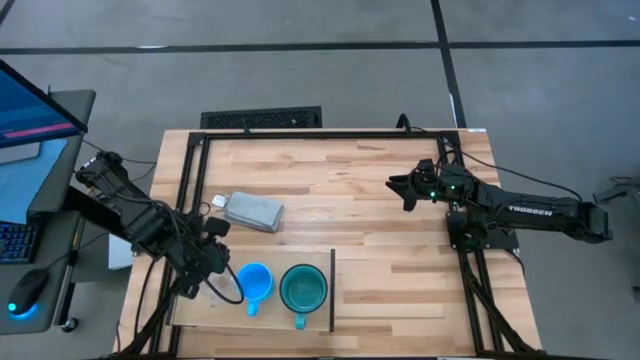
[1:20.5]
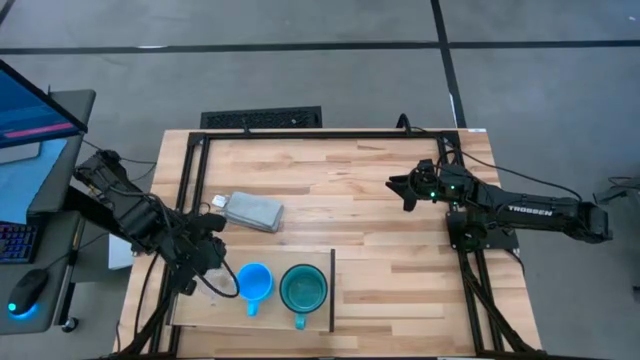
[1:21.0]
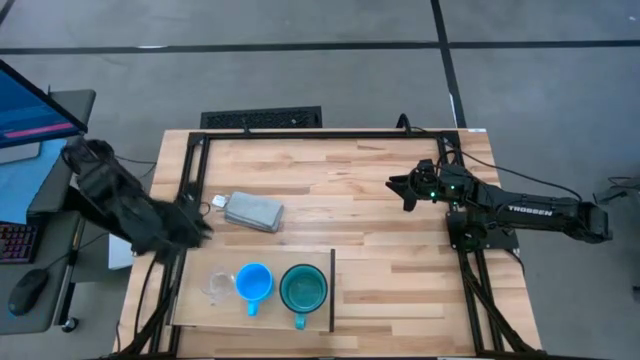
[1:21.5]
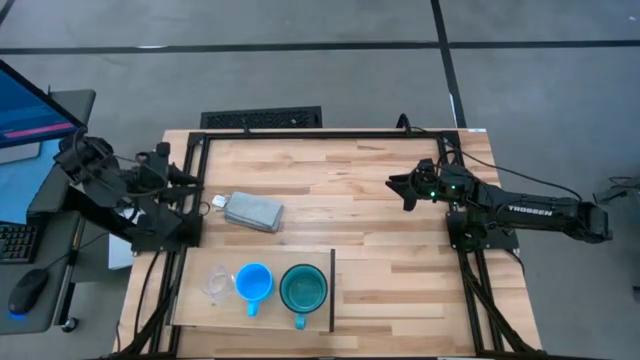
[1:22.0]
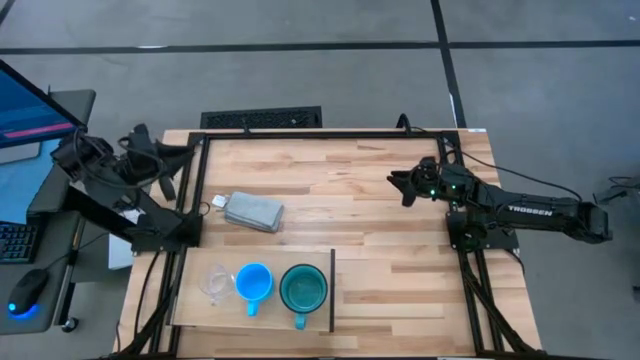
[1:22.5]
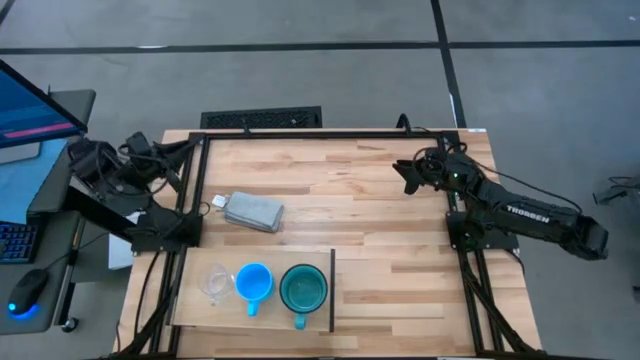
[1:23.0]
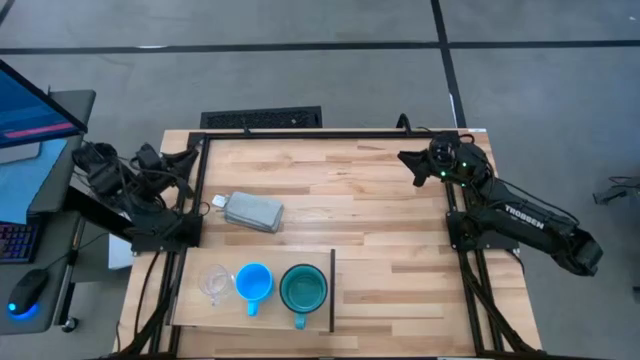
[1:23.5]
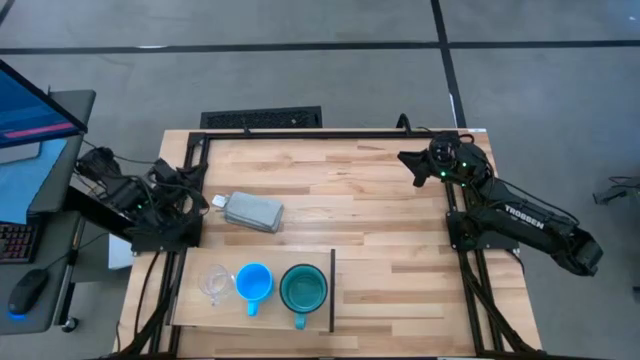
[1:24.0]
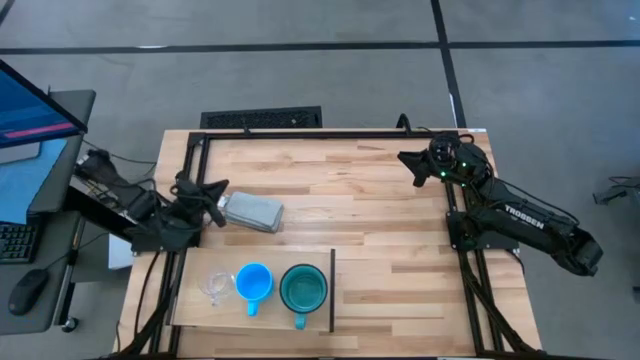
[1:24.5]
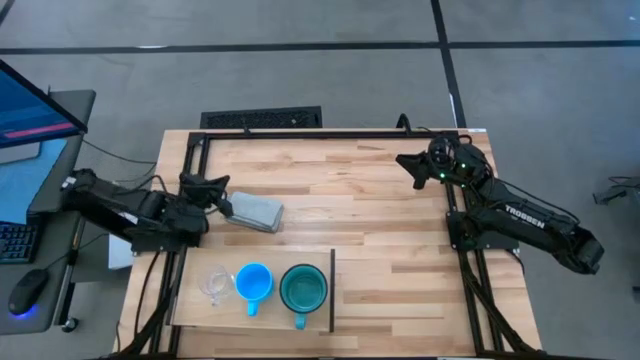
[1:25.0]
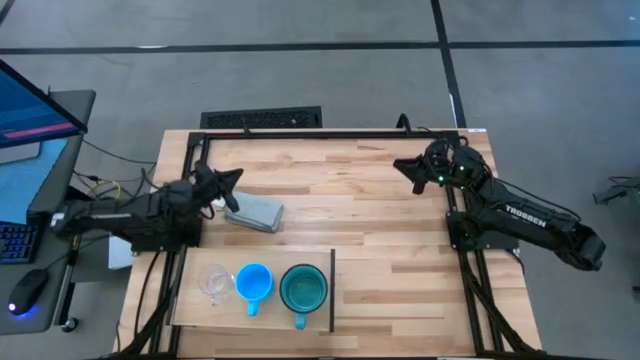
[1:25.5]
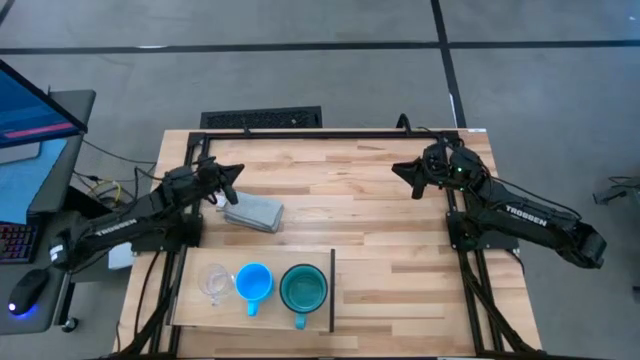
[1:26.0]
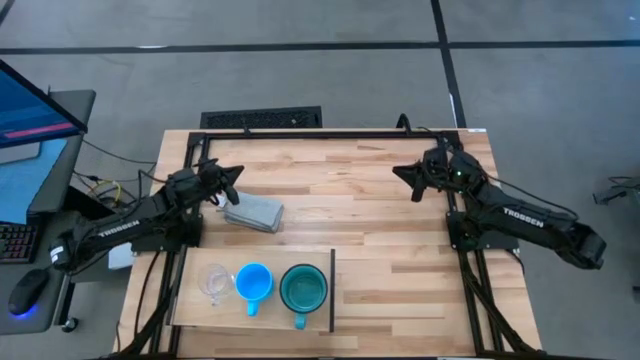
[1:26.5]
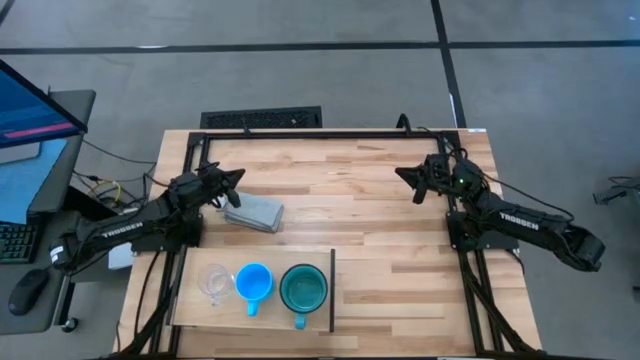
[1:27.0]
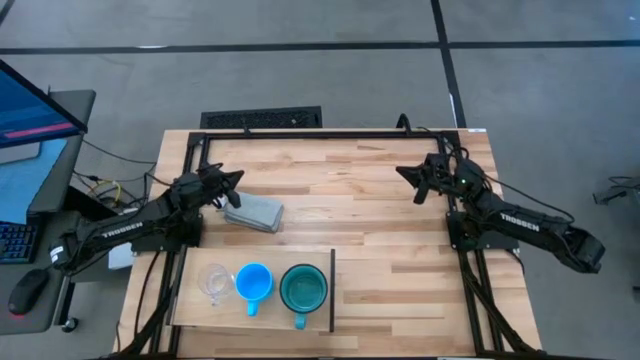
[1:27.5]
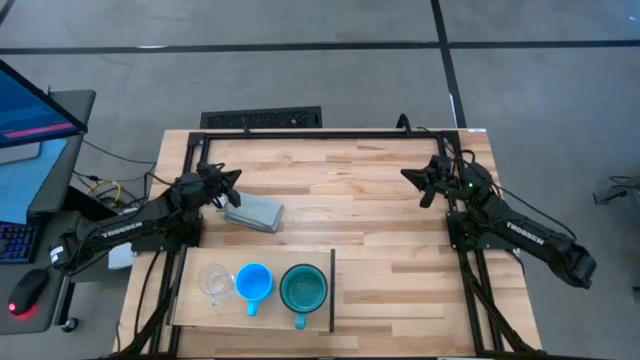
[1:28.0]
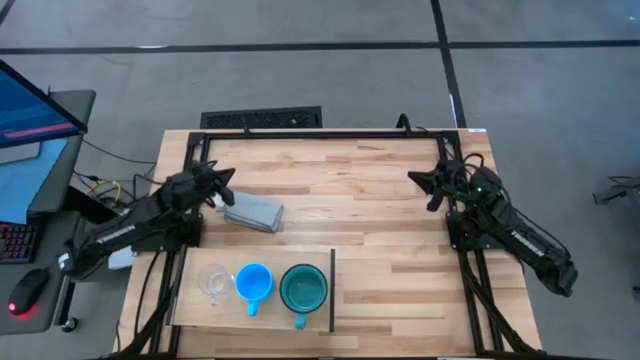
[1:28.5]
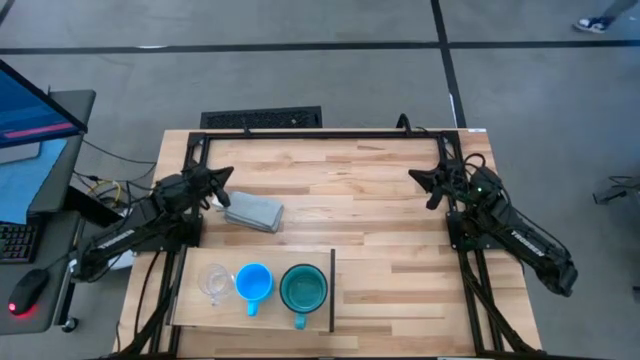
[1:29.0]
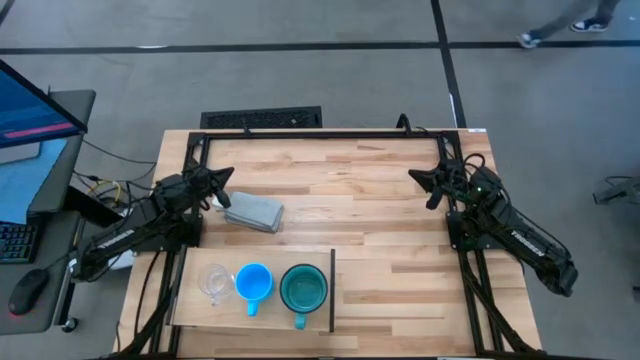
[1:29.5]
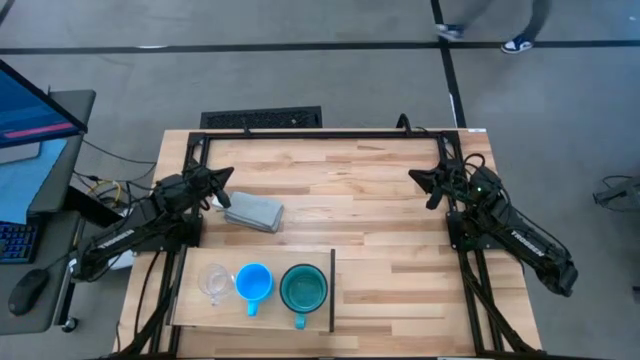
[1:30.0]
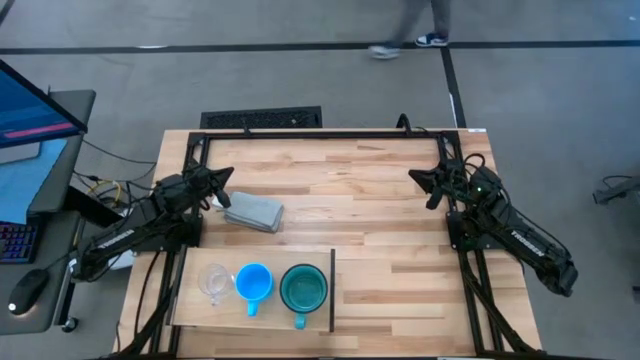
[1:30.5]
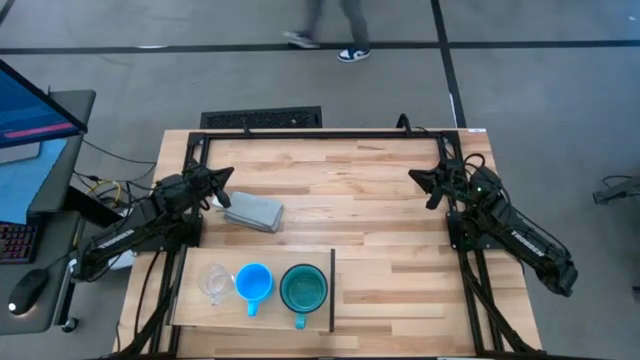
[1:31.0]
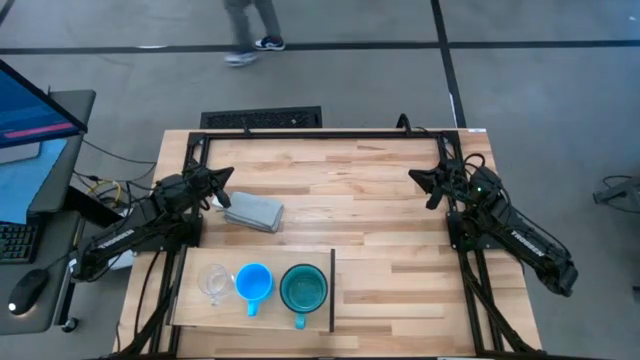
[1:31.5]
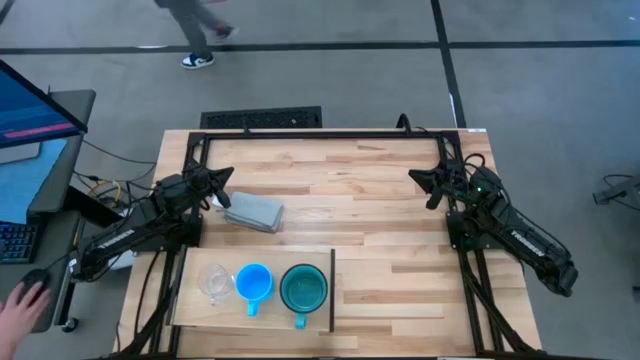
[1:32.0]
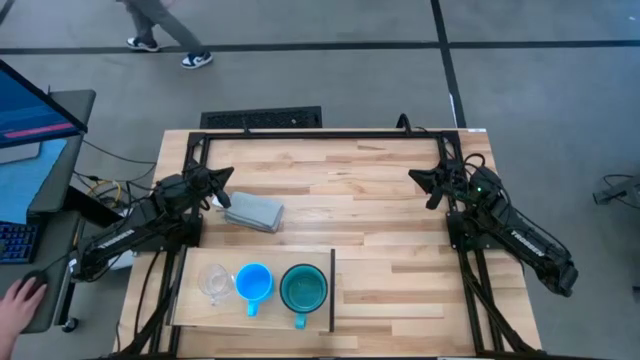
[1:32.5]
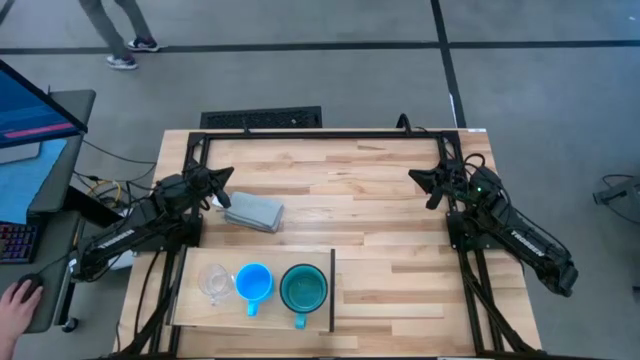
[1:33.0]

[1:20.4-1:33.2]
Task: Stack small to large cups/mugs on shelf
Return to Home Position

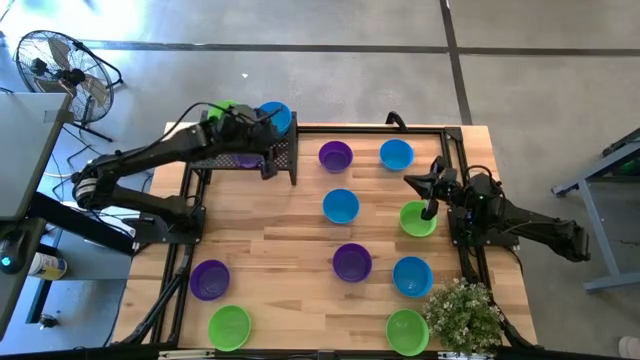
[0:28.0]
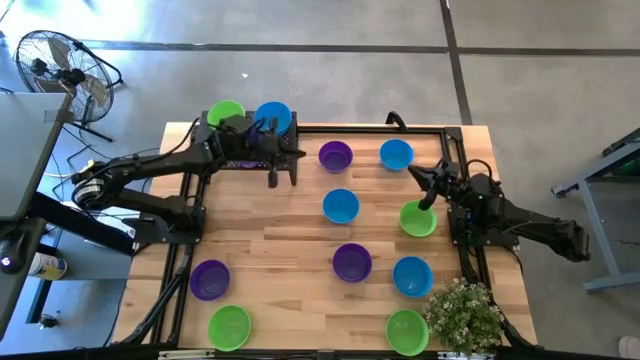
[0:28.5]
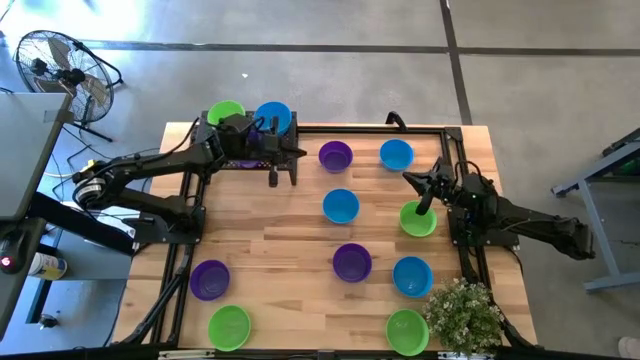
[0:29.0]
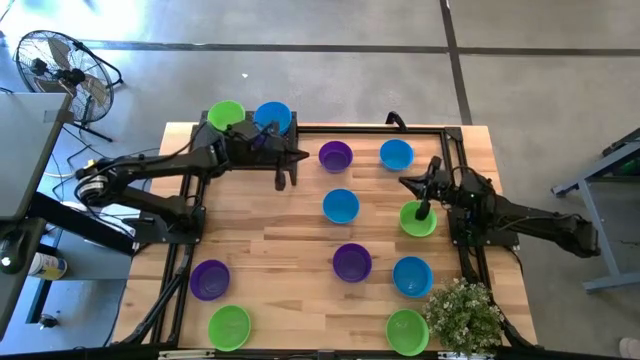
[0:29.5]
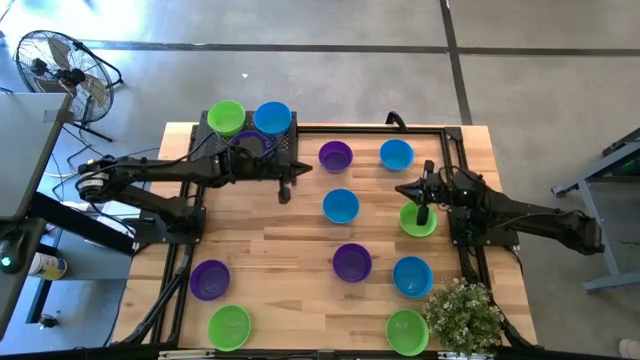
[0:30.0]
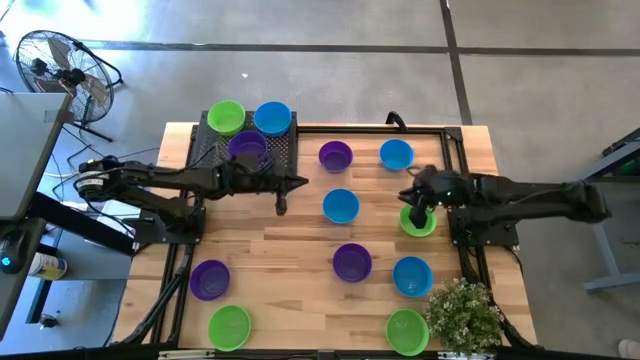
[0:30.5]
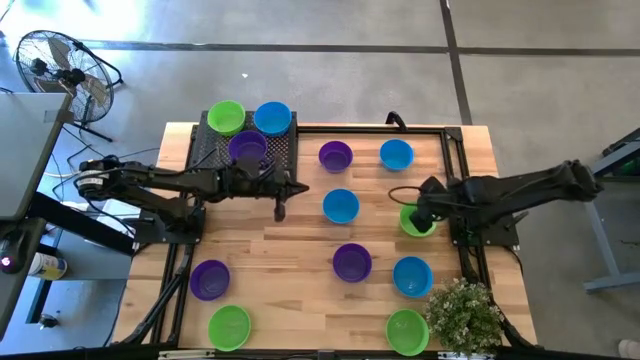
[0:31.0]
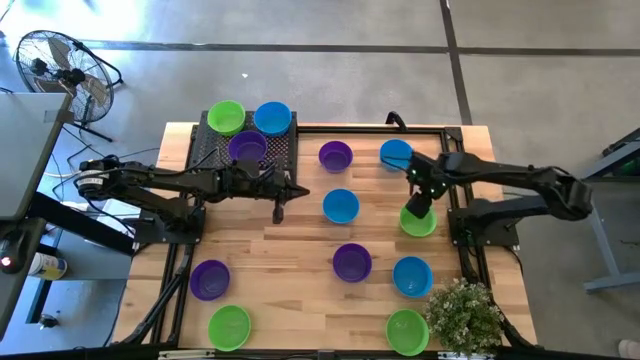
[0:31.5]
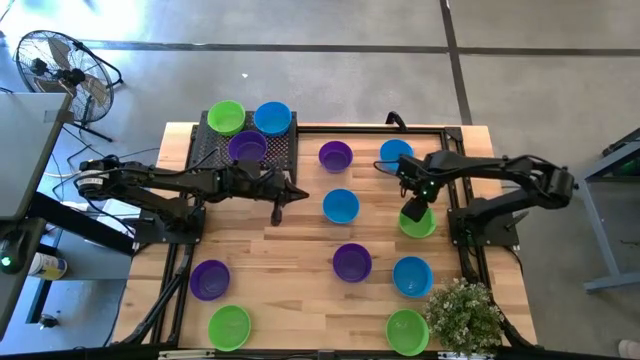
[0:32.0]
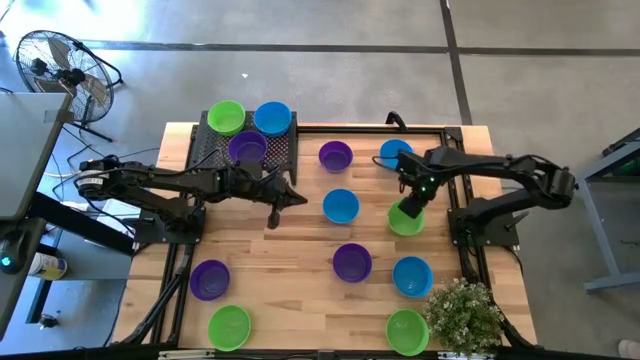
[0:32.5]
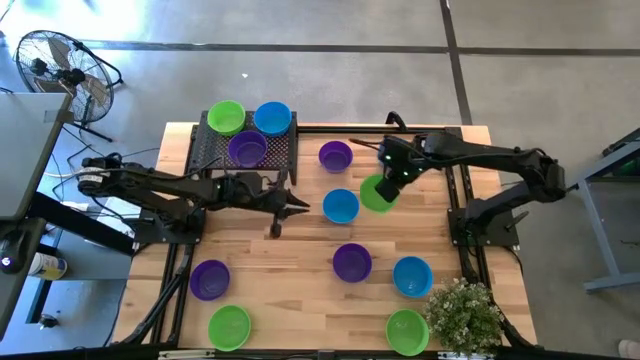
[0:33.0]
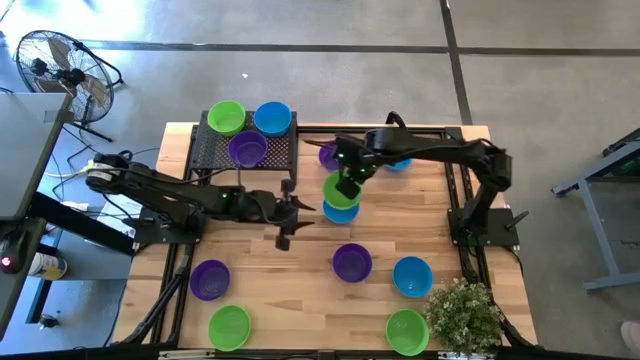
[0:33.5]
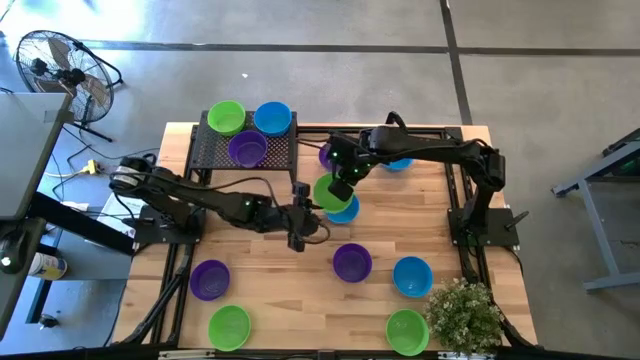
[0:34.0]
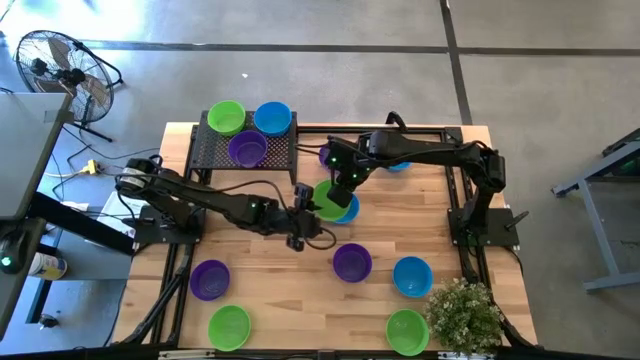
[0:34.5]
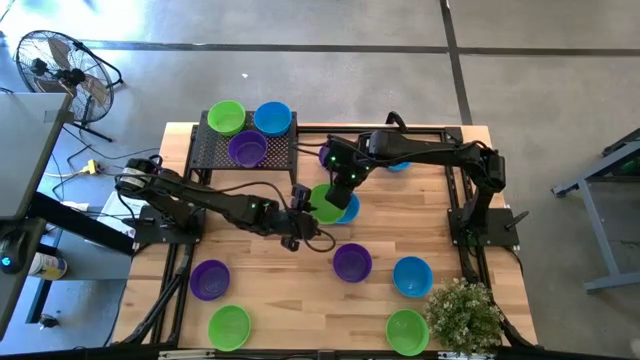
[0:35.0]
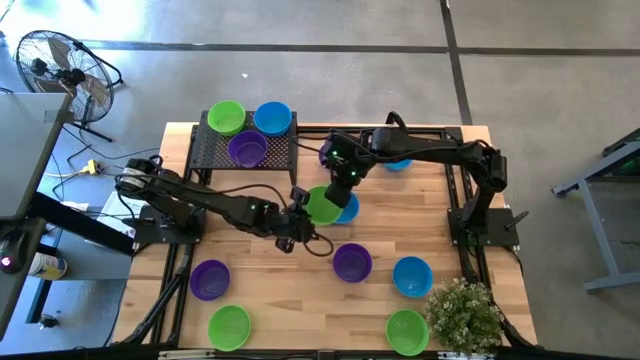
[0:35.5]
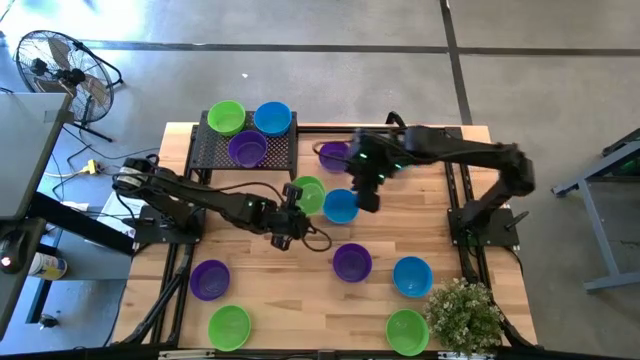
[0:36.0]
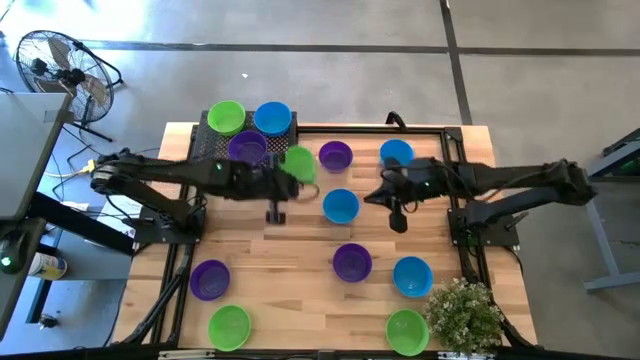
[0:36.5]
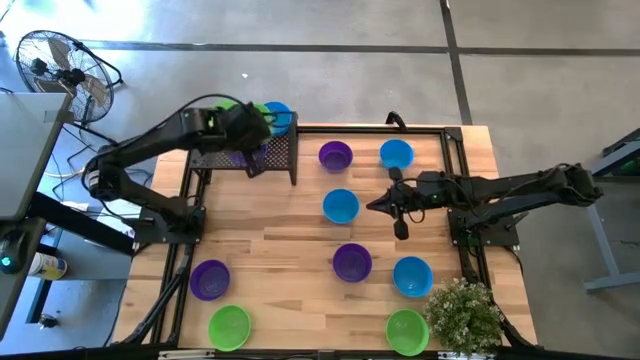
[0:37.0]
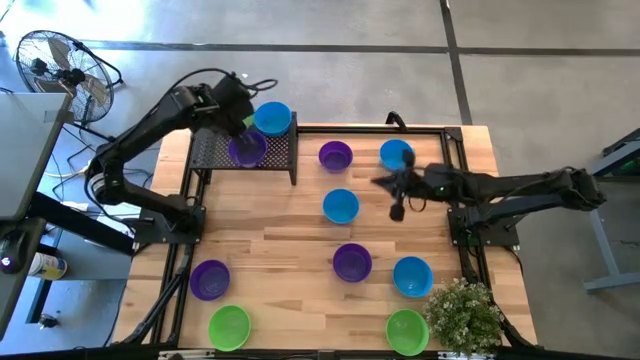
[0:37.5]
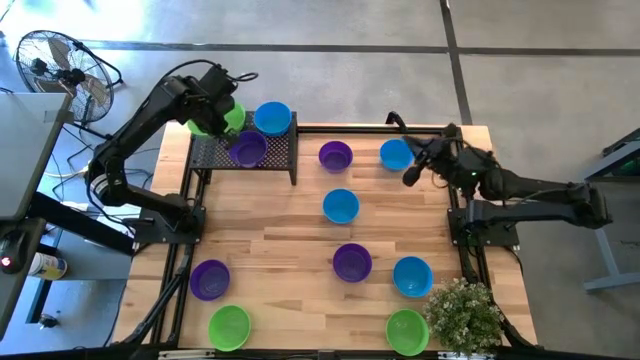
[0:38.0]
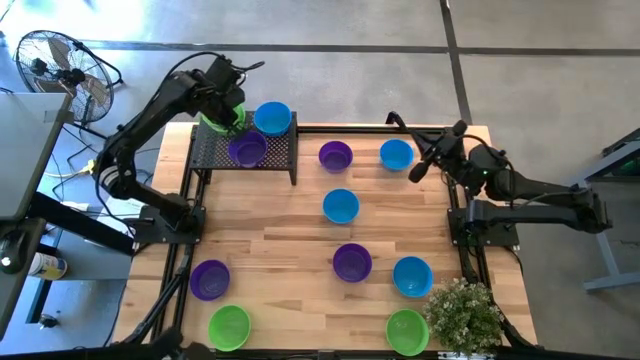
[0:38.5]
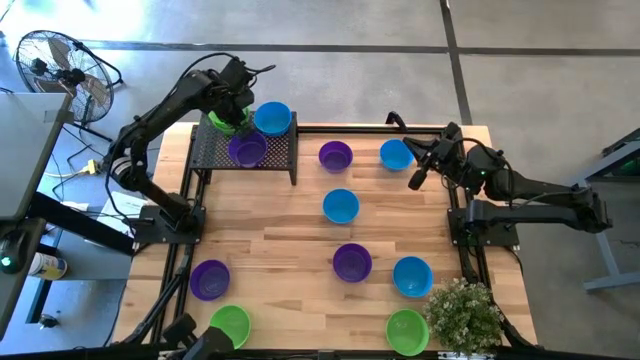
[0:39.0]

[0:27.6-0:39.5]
Task: Pick & Place Mini bowls
Stack the green bowl on top of the green bowl on the shelf
